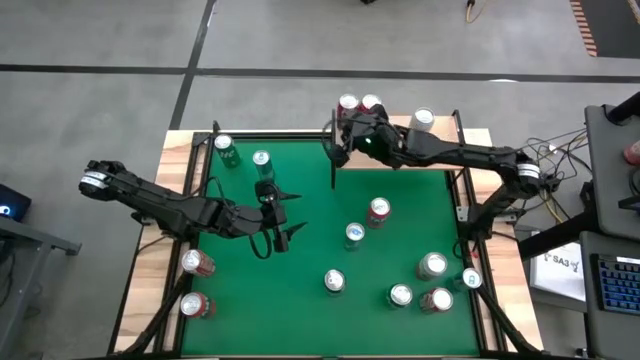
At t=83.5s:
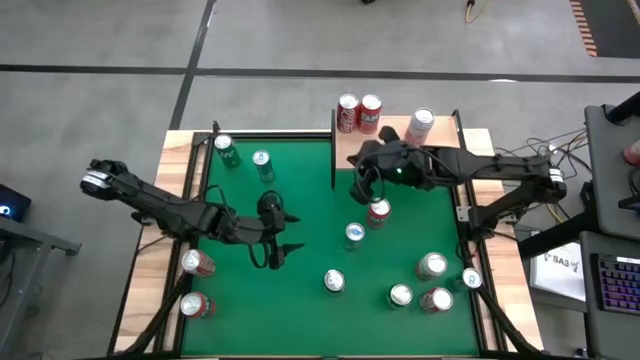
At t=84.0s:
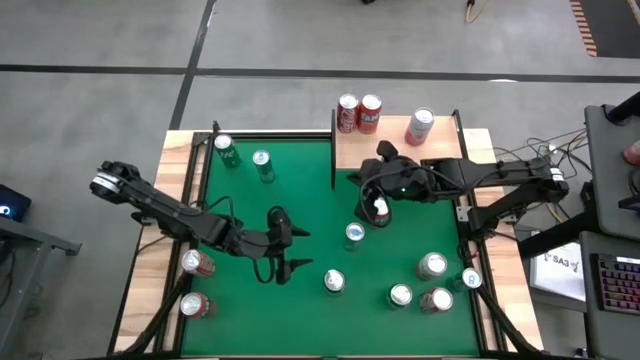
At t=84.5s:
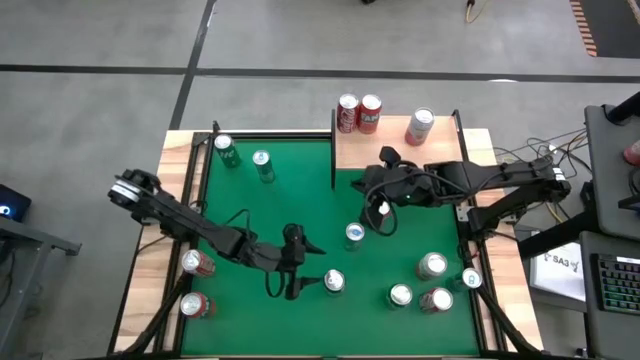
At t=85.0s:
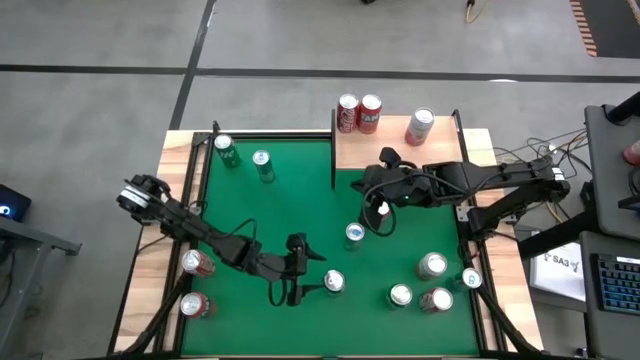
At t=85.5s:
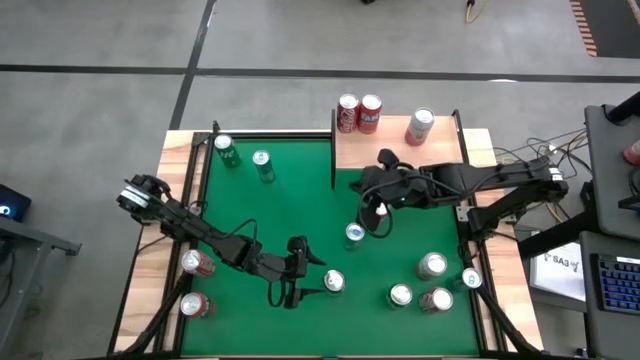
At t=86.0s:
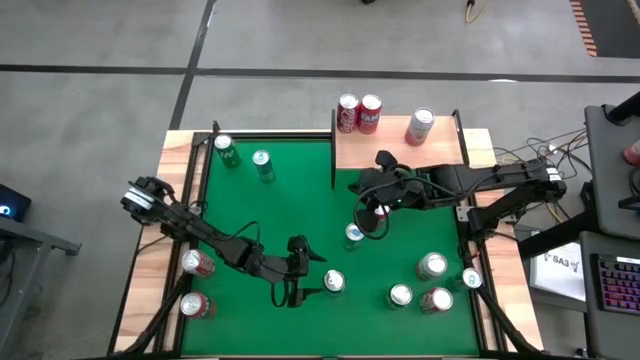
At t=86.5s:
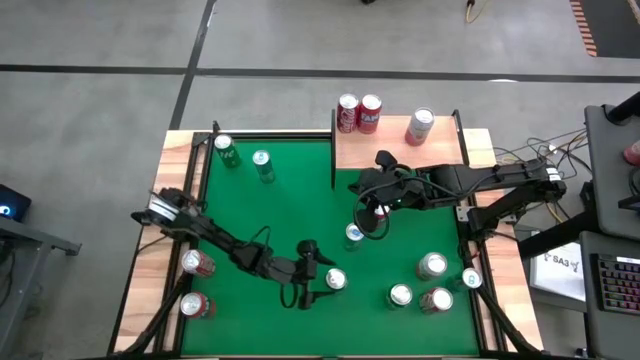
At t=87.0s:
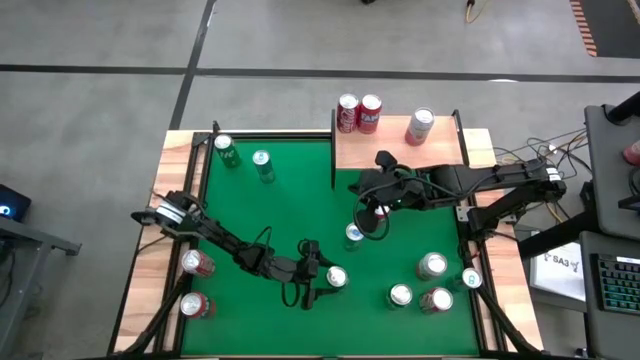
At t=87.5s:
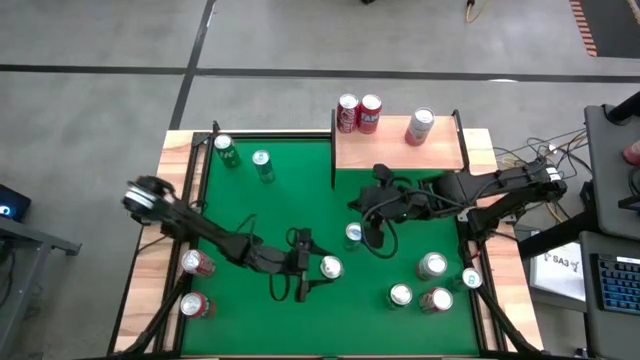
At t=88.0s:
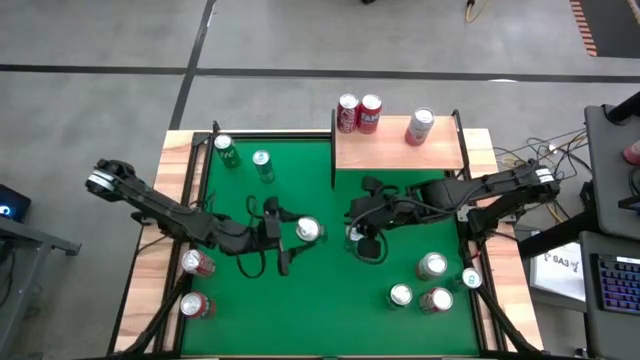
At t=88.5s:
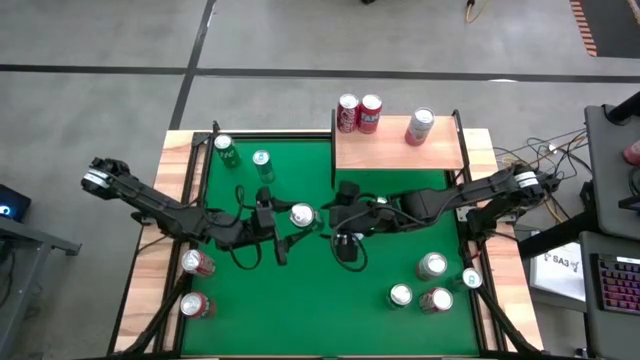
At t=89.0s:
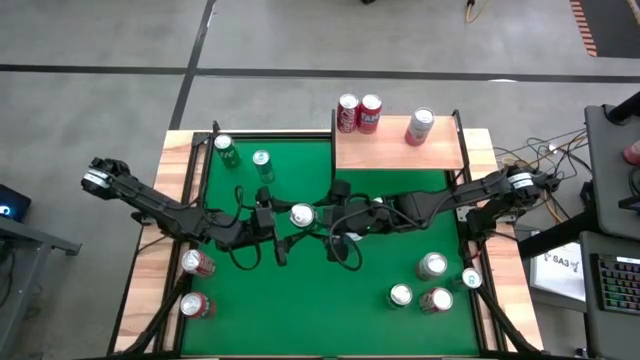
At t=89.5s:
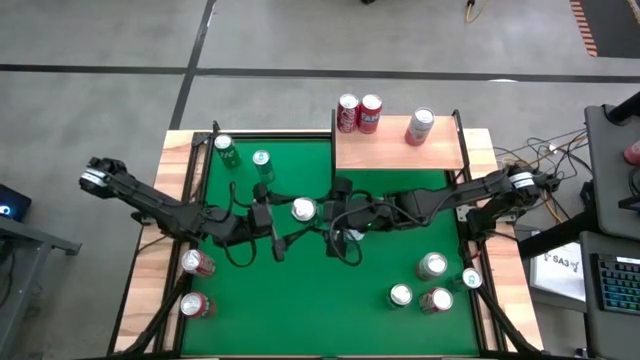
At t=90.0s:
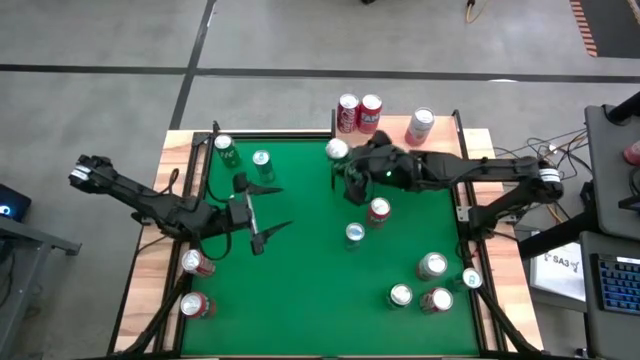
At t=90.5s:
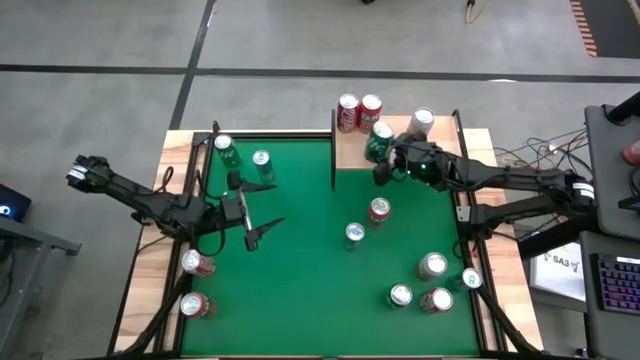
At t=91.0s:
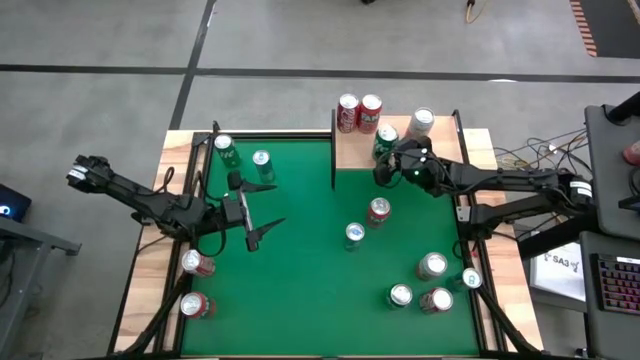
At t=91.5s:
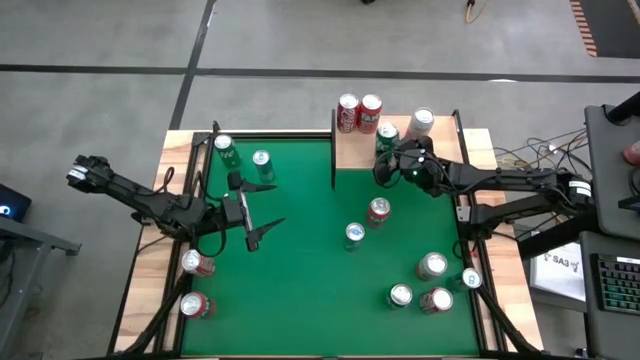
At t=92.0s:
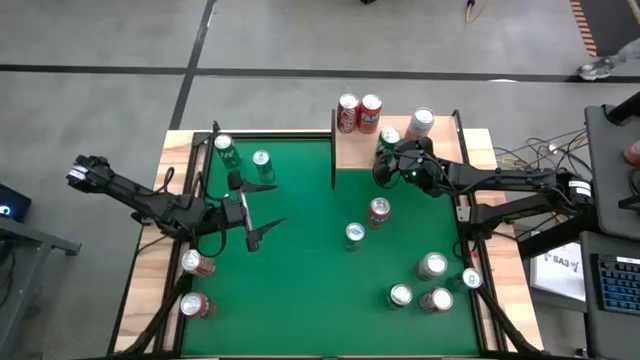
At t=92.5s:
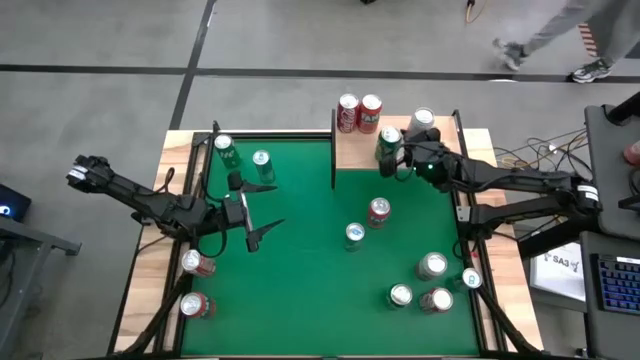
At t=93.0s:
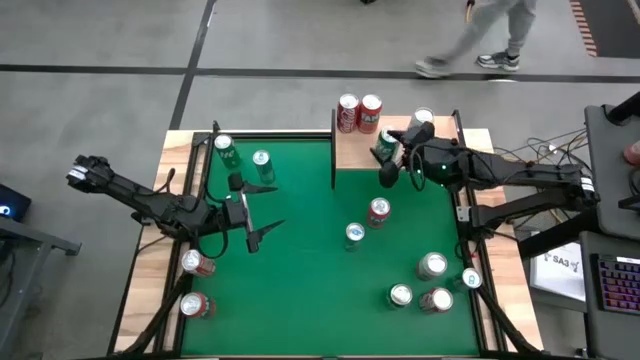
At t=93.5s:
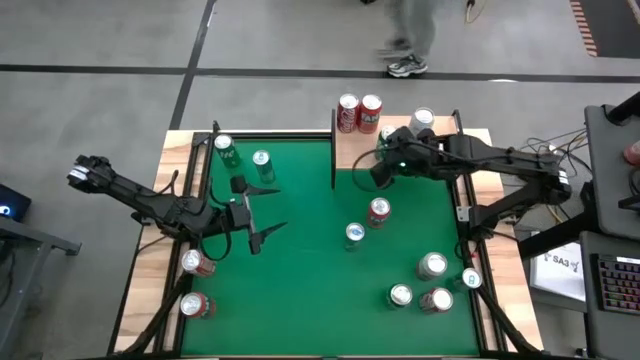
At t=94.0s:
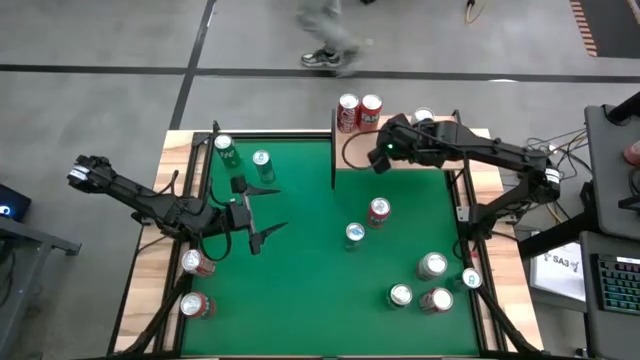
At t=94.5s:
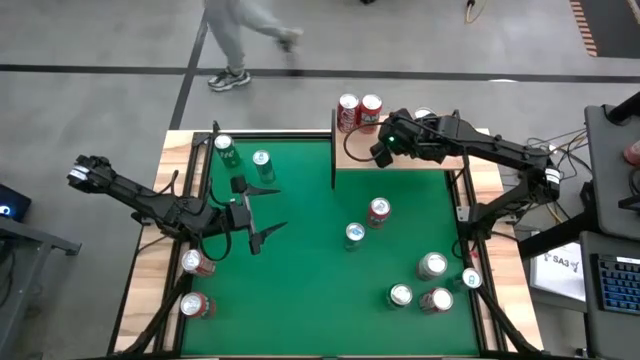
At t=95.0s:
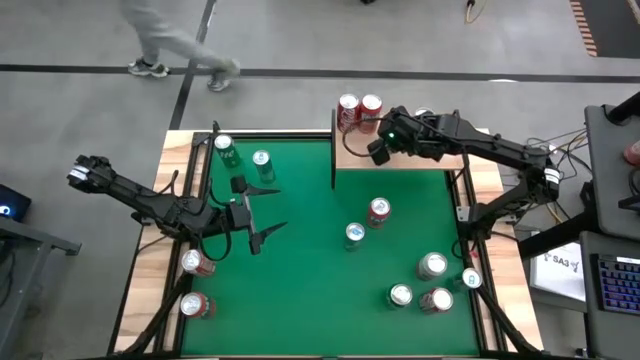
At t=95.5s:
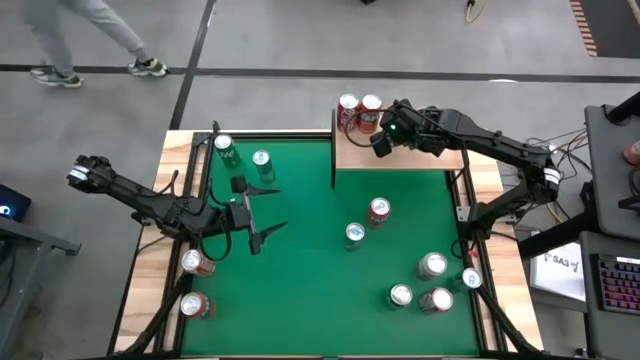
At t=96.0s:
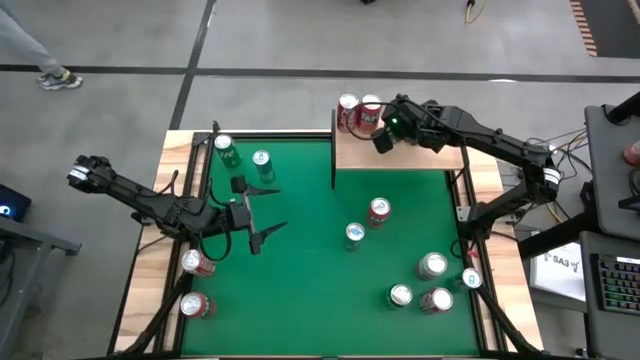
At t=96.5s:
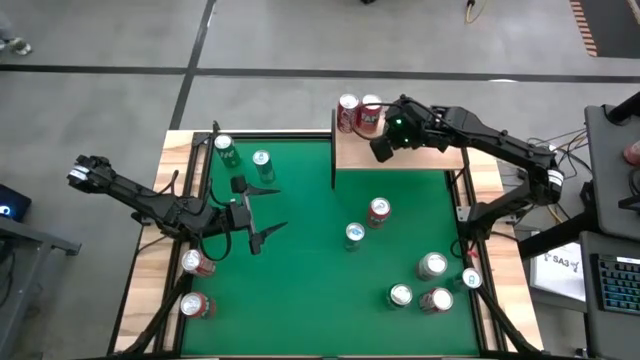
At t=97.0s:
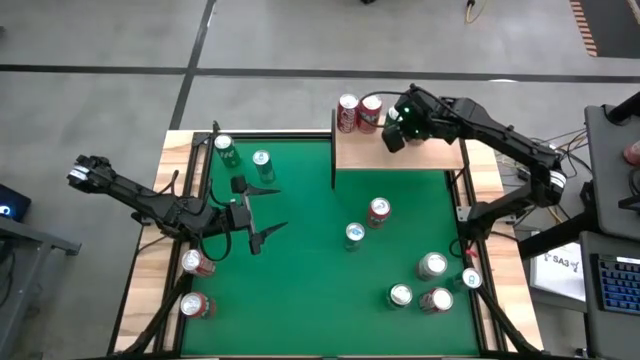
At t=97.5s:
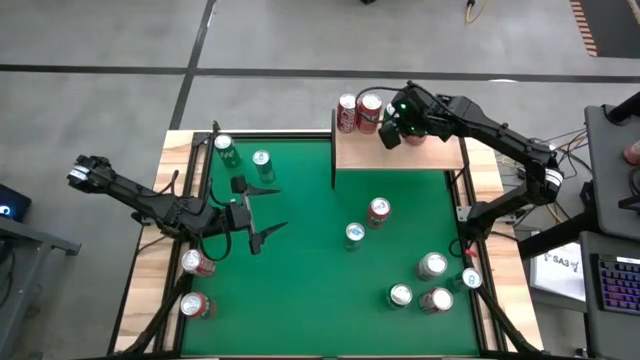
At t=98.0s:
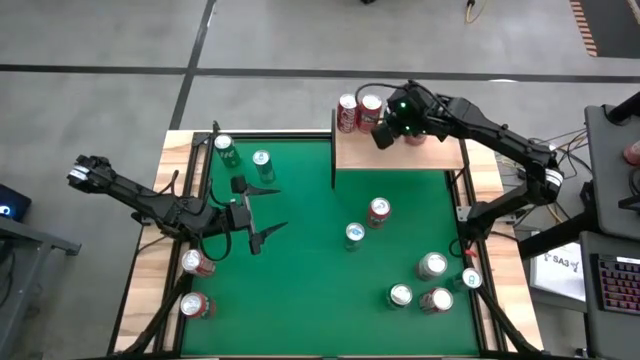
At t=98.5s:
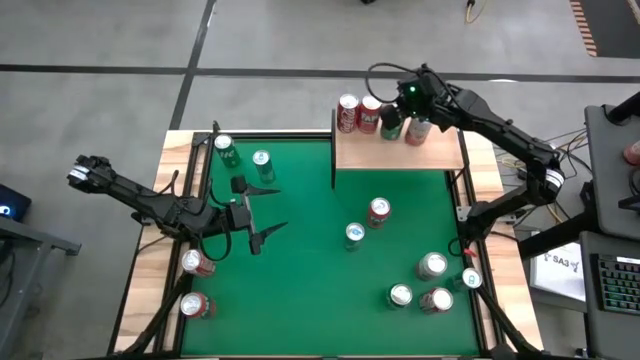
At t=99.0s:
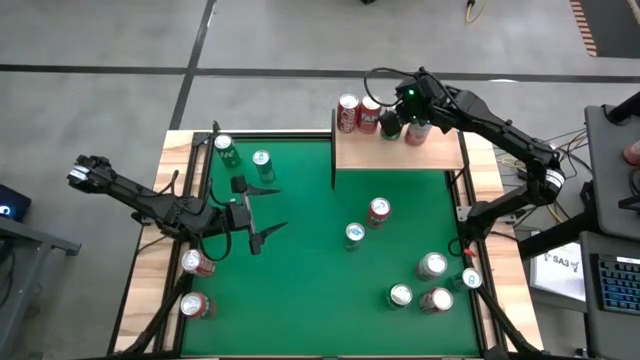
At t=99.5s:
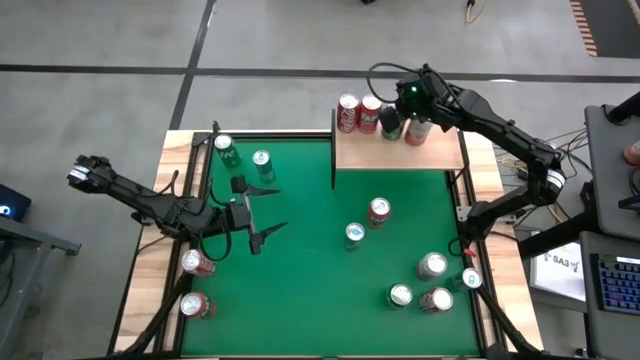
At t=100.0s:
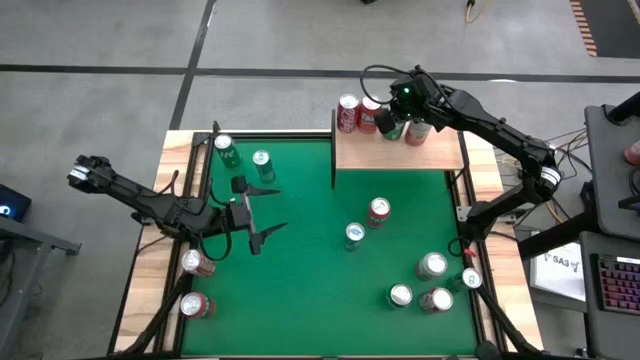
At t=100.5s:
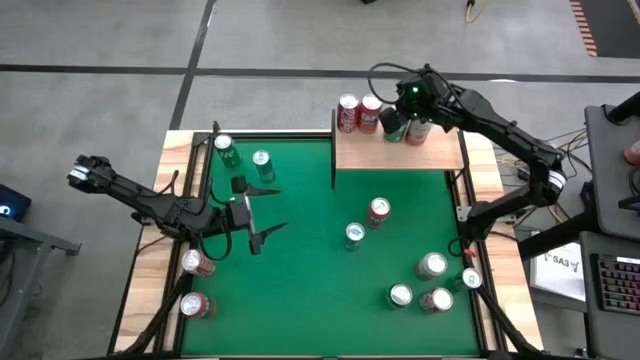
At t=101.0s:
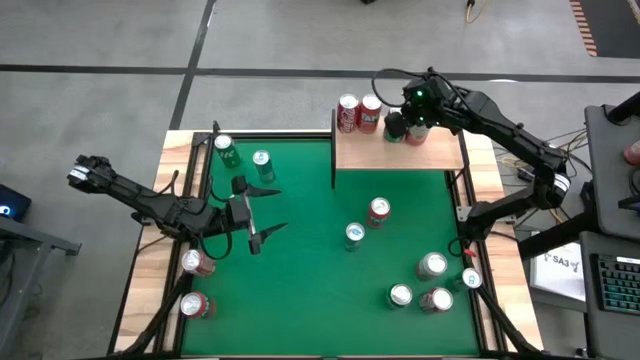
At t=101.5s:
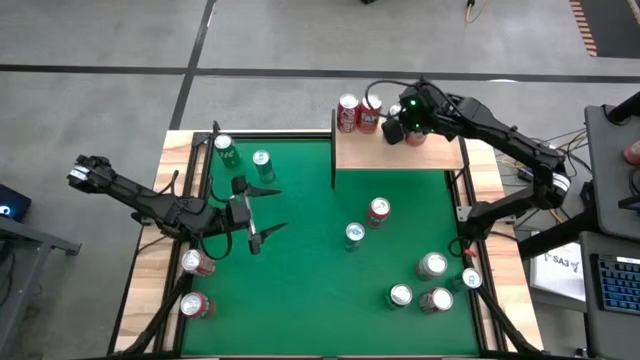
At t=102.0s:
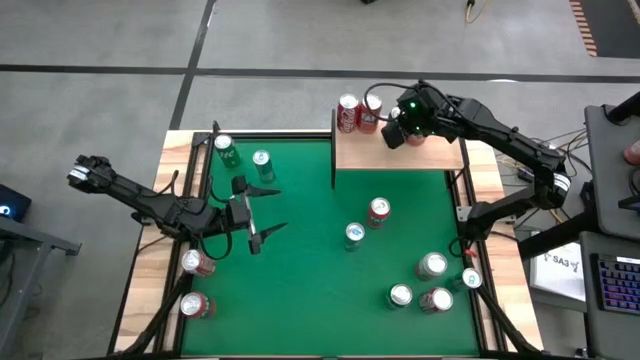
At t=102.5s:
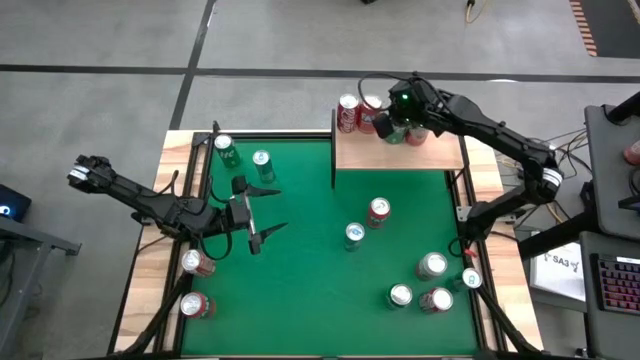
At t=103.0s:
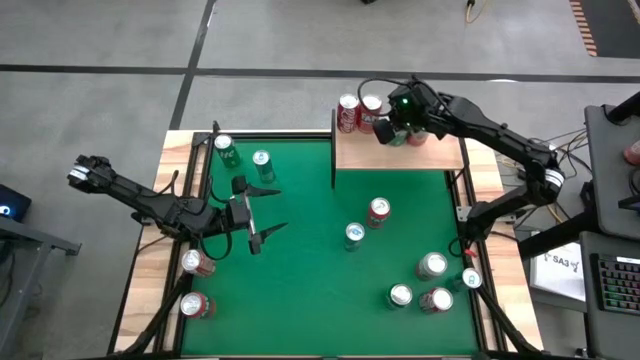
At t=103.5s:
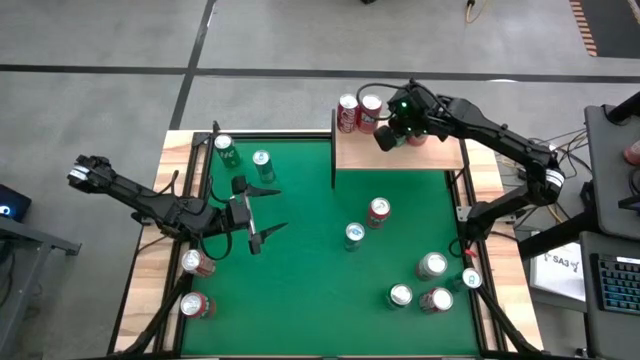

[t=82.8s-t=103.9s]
Task: Place canned beverage on shelf
Put the bottom left green soda can on the shelf

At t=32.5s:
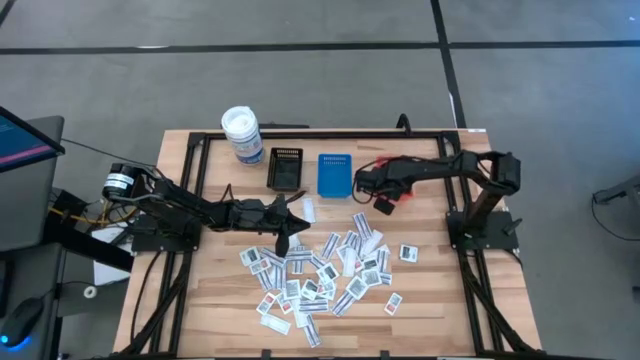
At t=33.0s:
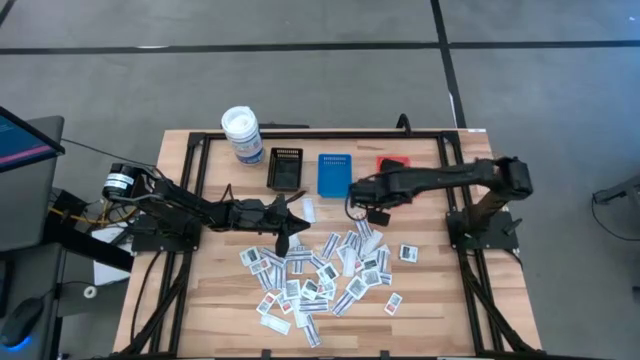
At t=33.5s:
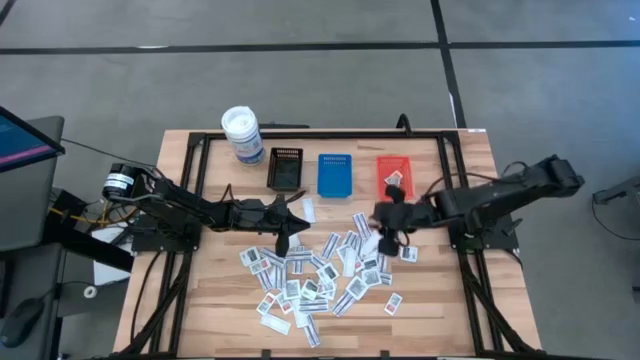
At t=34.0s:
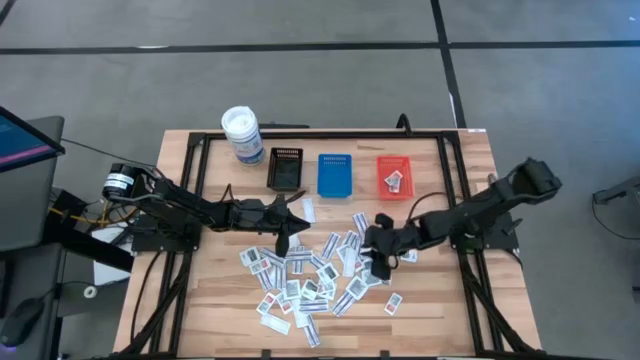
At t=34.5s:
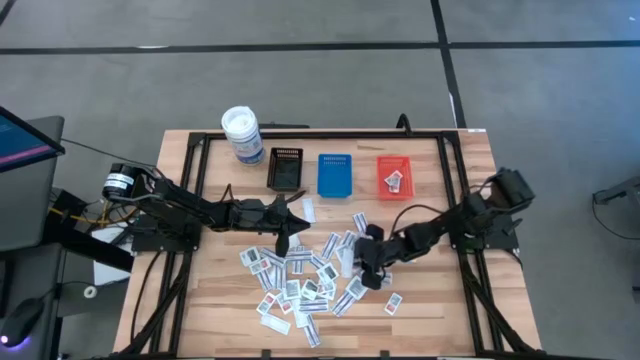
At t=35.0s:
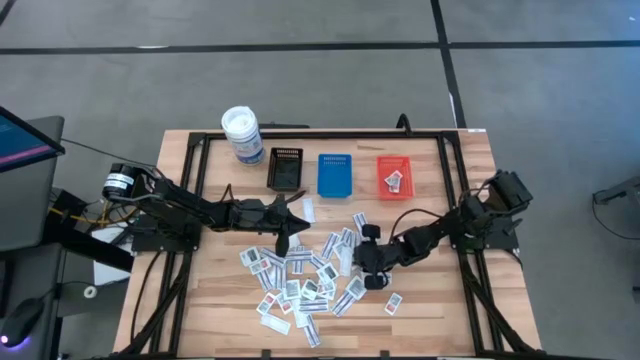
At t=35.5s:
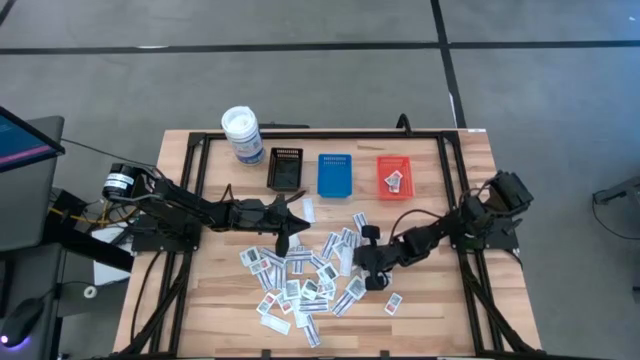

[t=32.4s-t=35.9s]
Task: Pick & Place First Aid Supplies
Put the orange ointment pack into the orange bin
